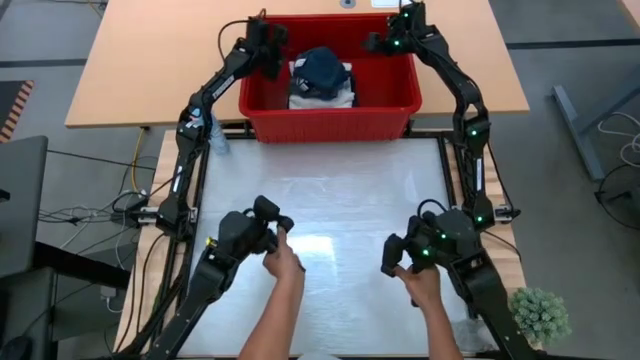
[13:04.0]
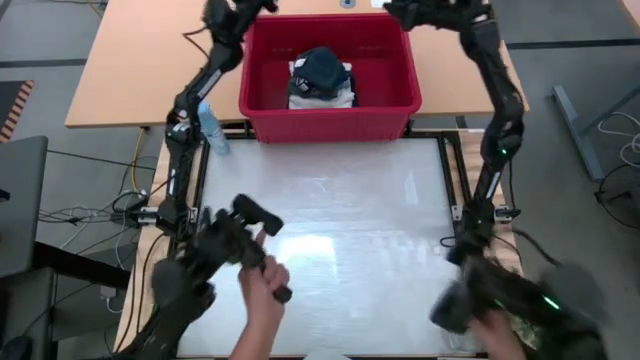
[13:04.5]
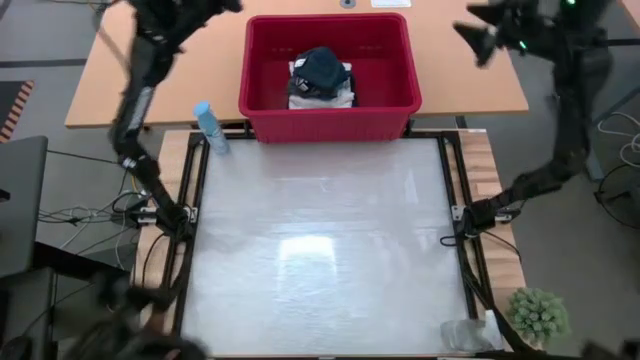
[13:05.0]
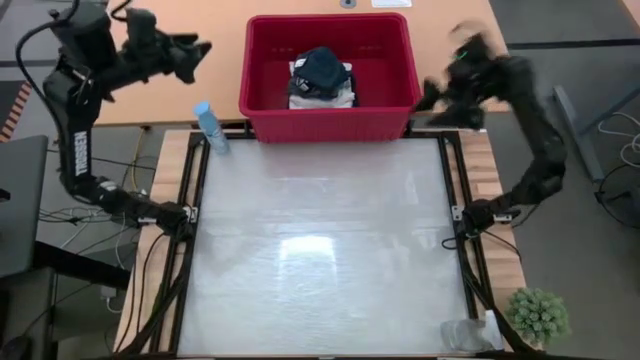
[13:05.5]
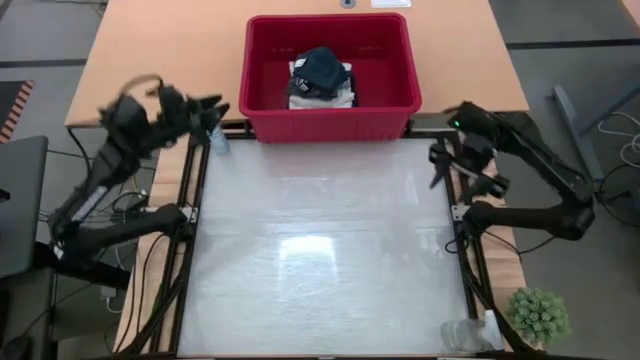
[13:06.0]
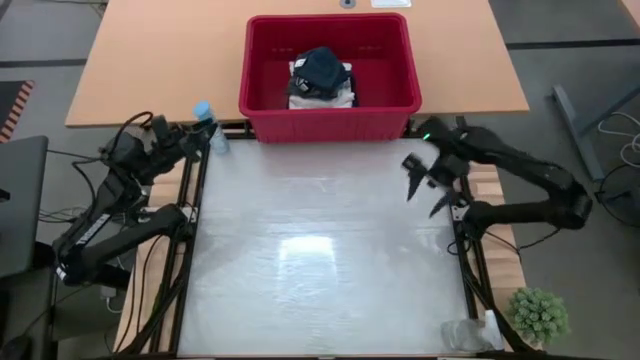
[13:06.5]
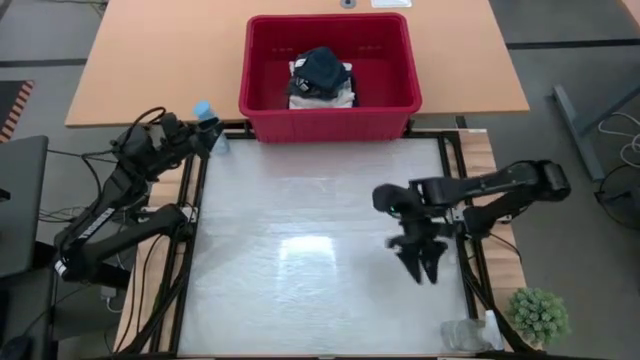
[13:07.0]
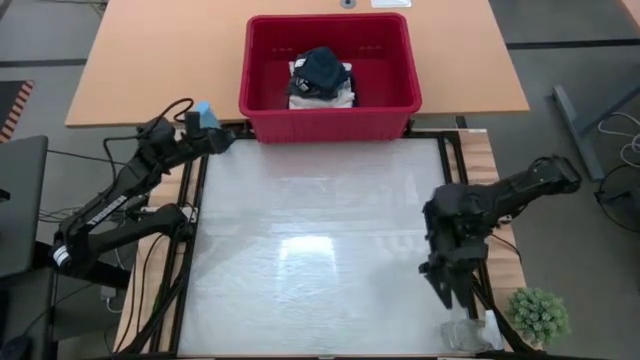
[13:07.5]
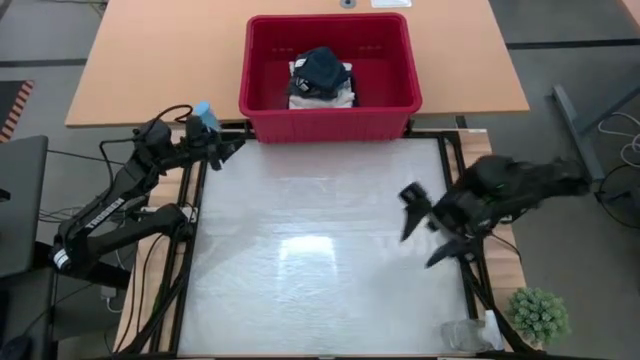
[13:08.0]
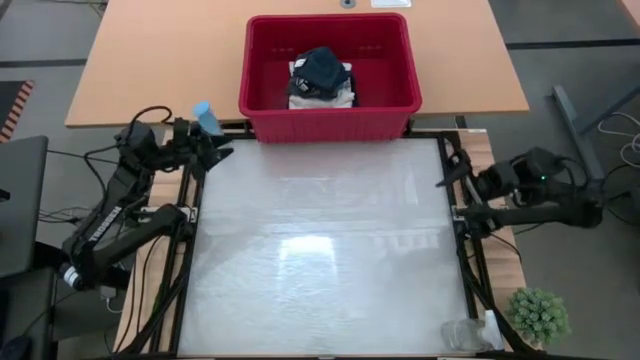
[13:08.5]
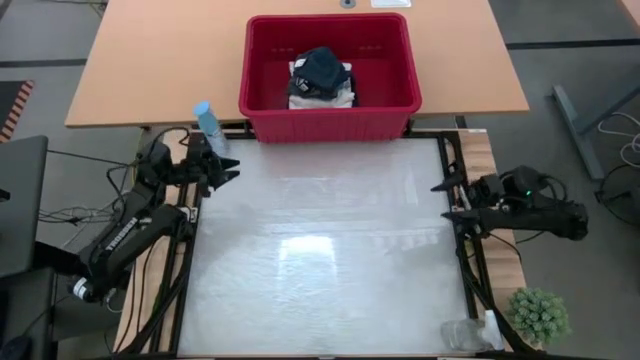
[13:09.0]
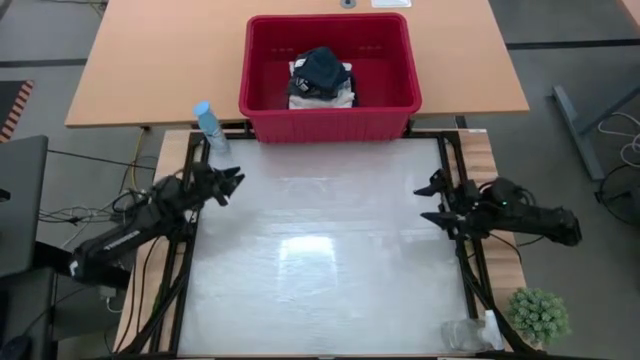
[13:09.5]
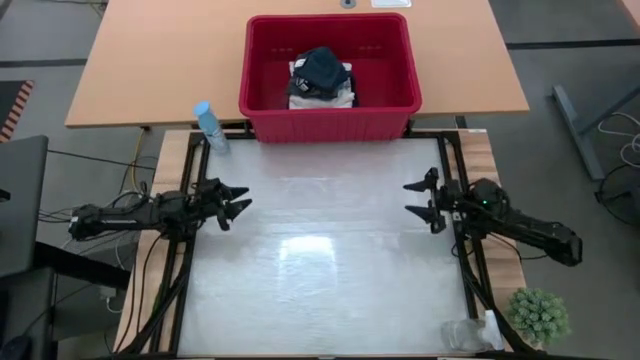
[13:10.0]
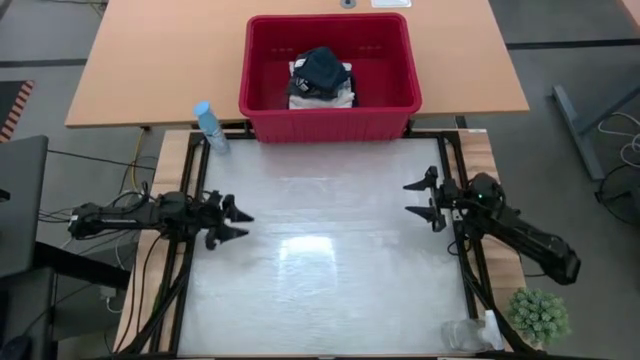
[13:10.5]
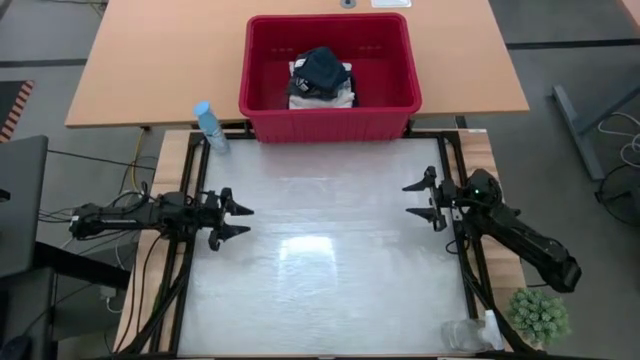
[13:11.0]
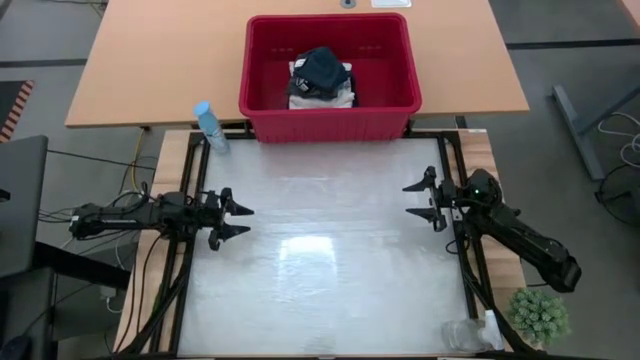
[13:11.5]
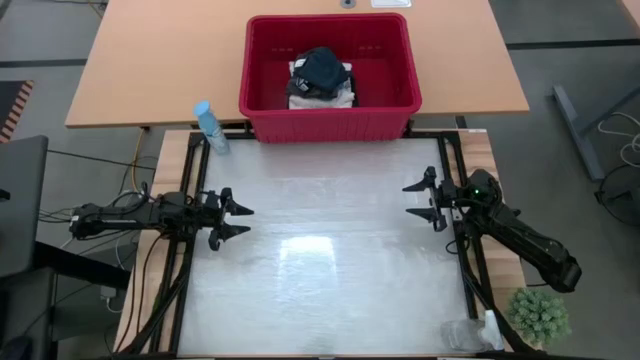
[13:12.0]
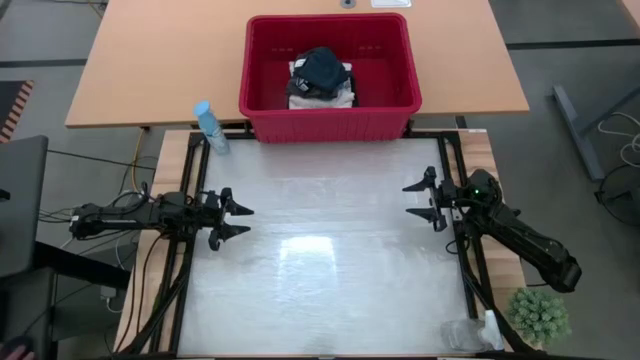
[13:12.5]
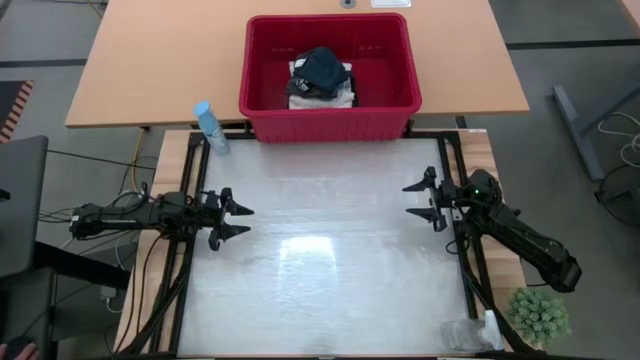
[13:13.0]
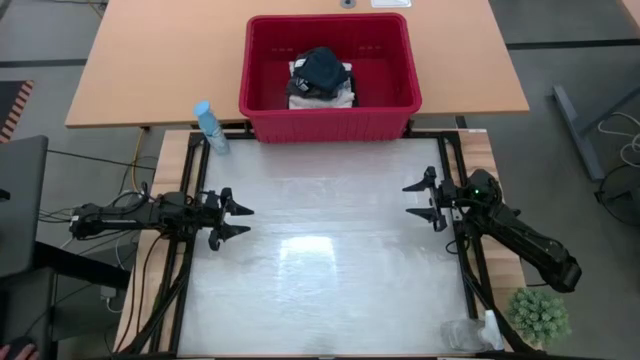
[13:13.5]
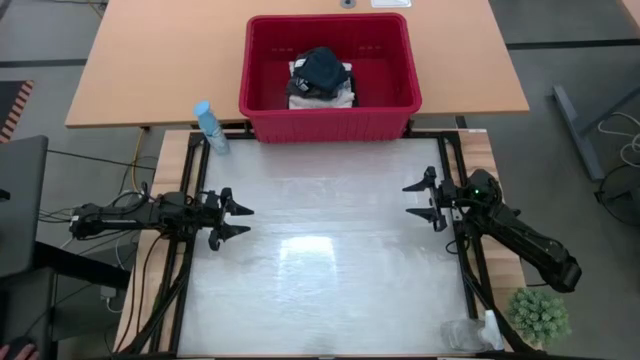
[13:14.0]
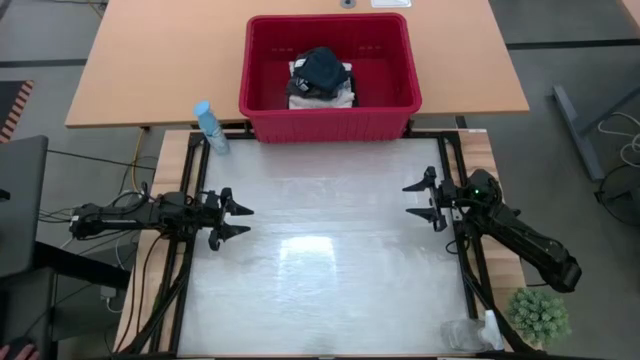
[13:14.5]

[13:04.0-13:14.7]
Task: Fold laundry
Return to Home Position

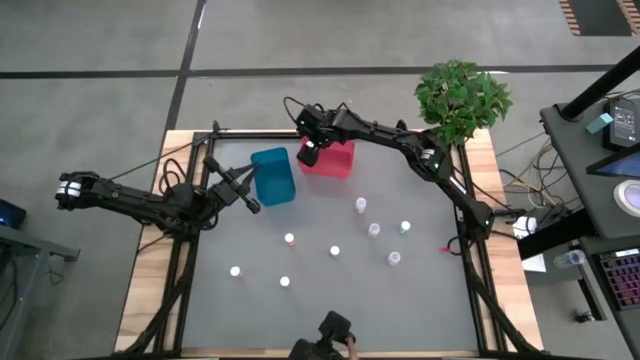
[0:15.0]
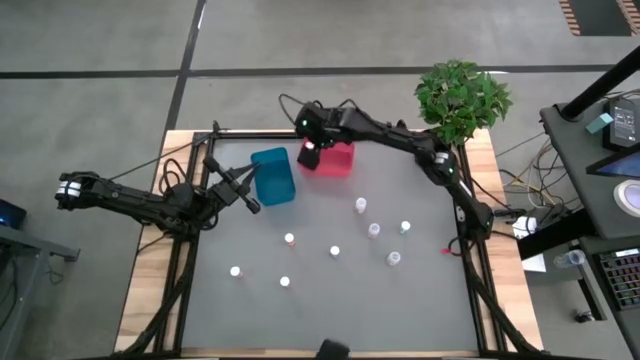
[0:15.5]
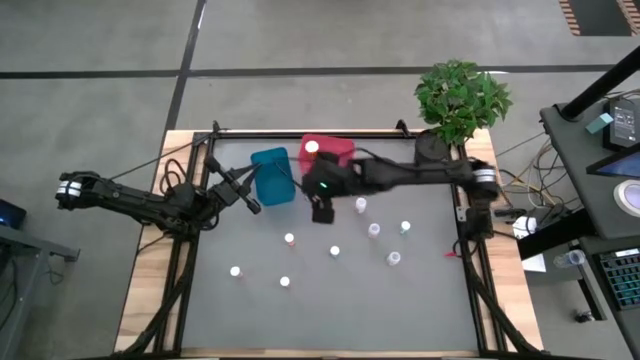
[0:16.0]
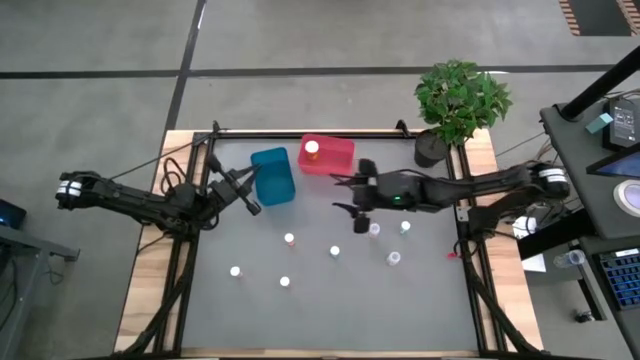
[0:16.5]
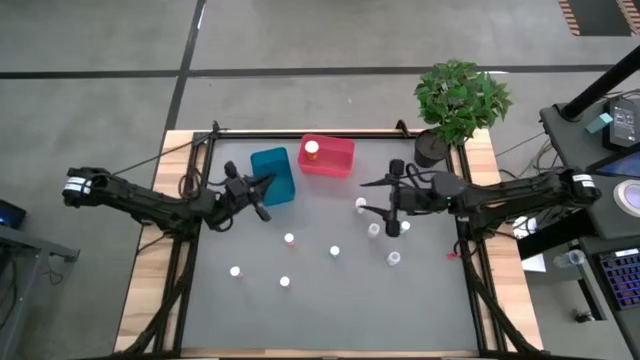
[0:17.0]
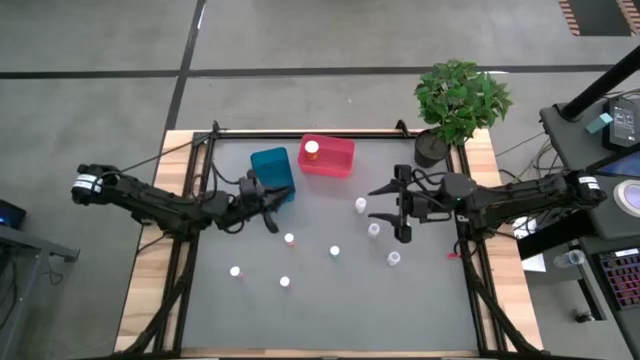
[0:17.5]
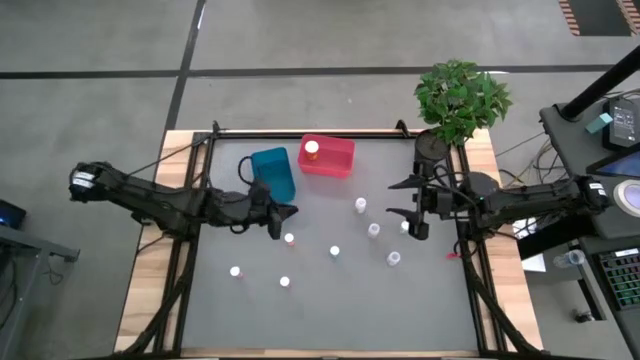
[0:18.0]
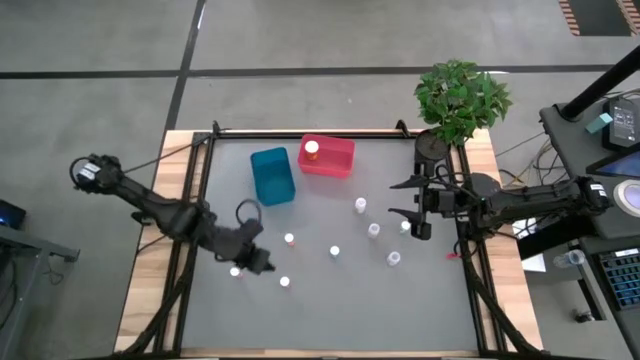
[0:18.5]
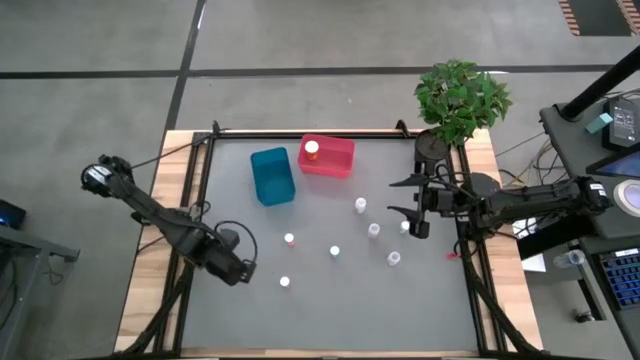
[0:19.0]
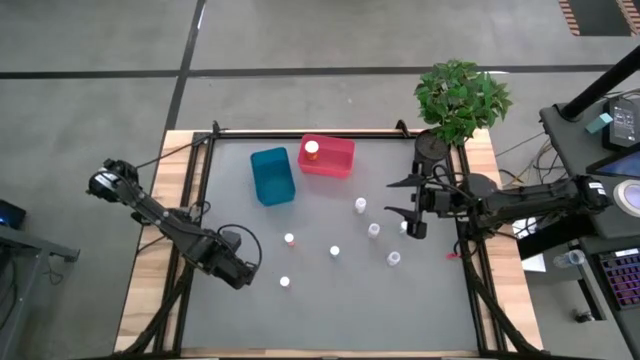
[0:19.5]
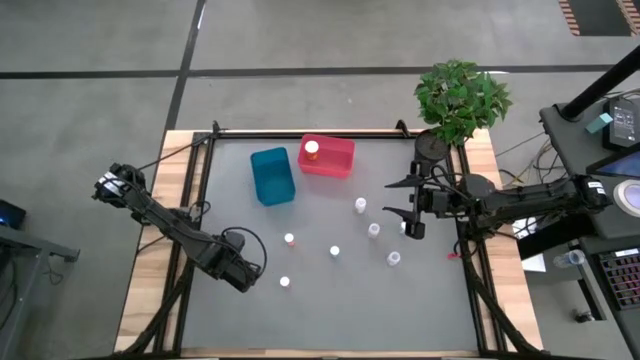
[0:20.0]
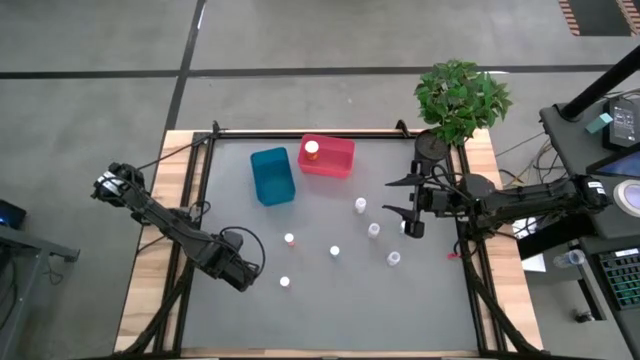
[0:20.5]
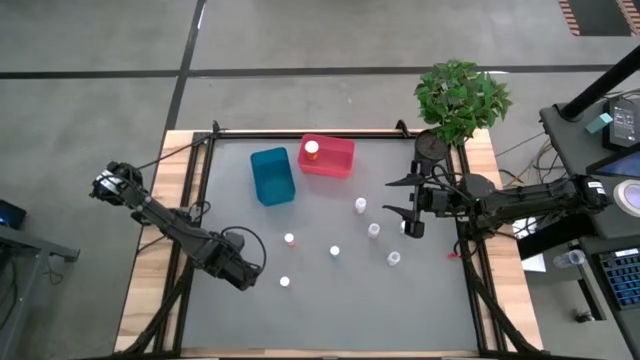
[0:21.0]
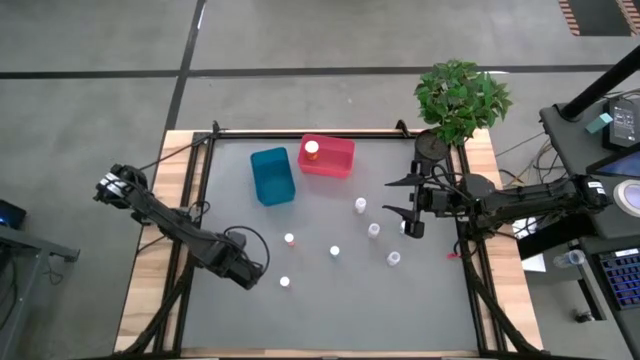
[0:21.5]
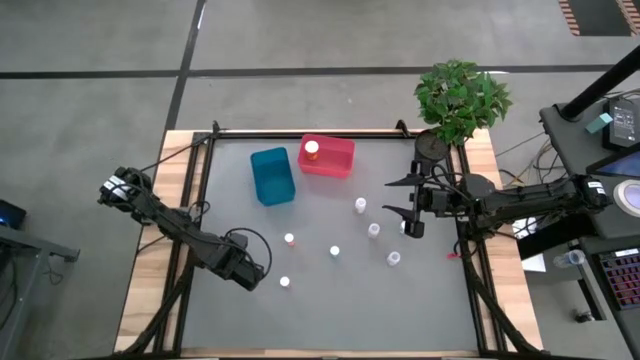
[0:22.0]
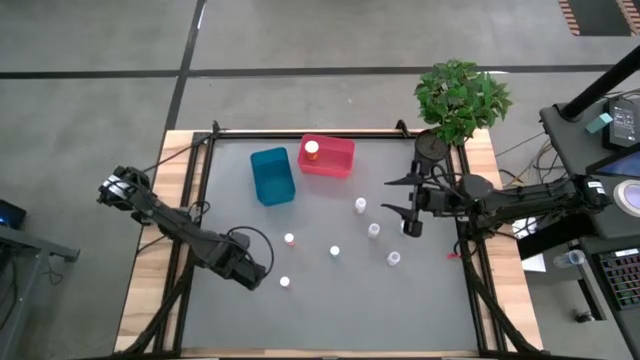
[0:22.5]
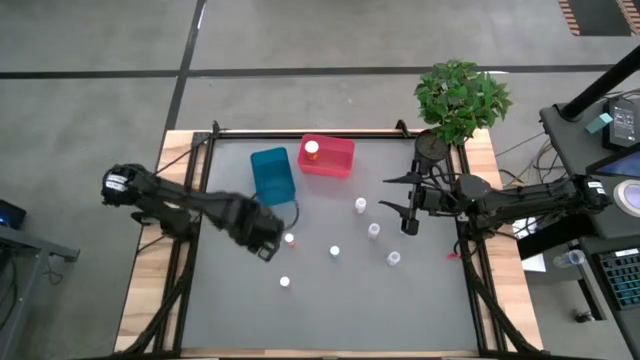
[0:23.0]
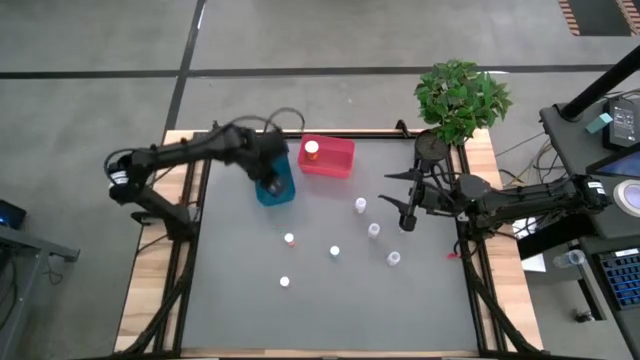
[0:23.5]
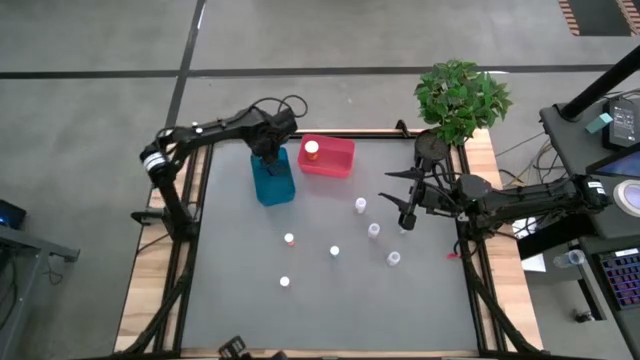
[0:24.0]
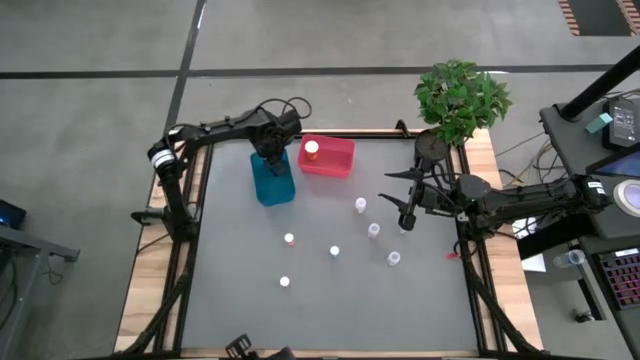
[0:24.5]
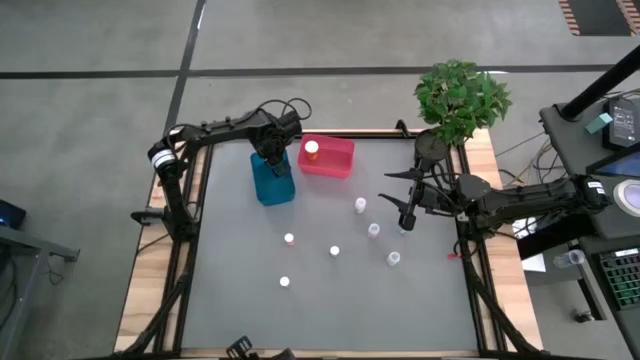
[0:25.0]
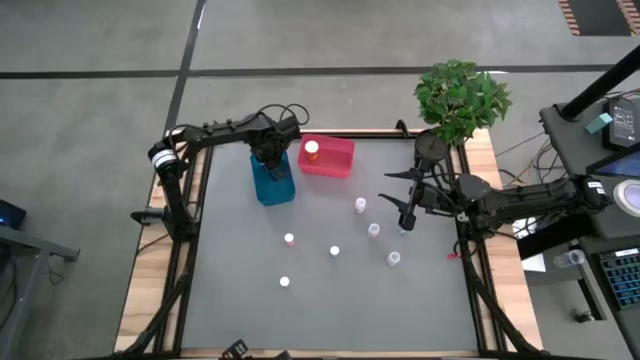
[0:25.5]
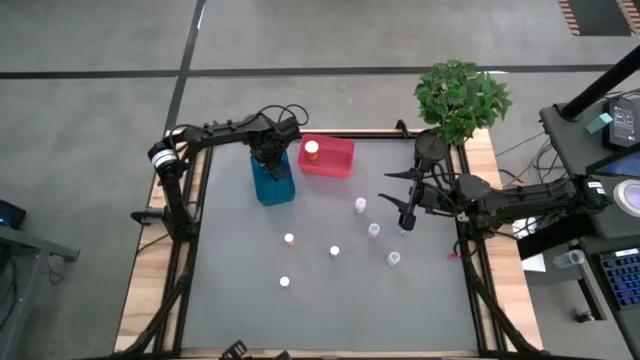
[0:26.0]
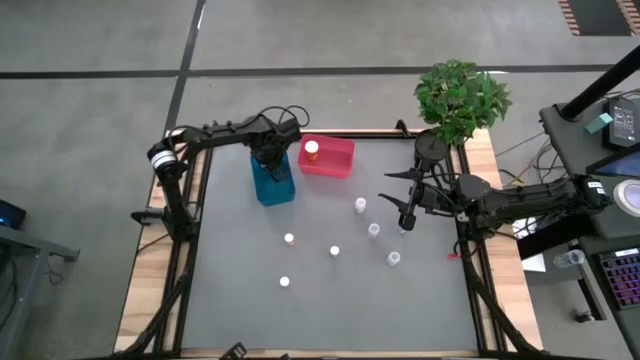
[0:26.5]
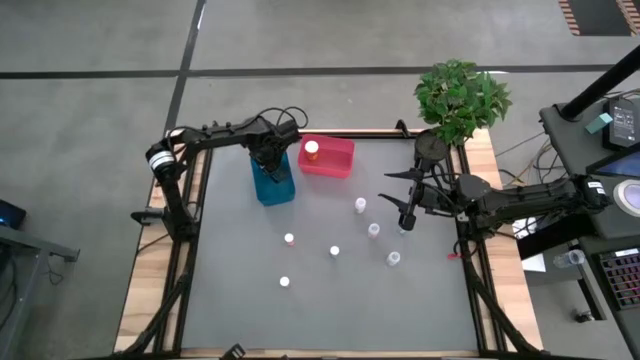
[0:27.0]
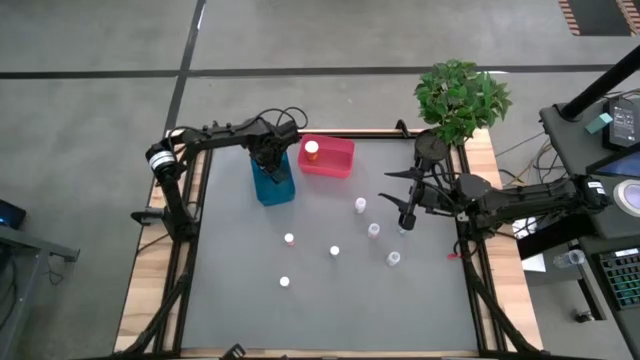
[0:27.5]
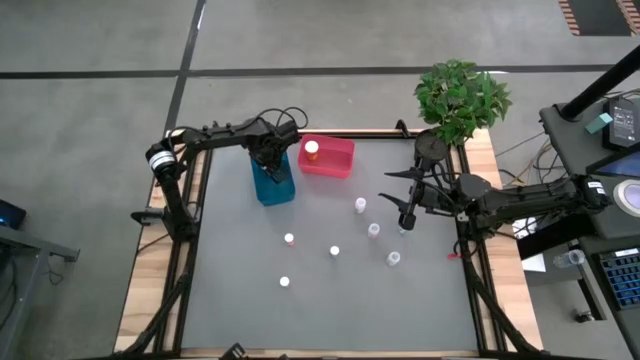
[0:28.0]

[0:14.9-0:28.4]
Task: Pick and place medicine bottles into bin by pill shape (circle, oval)
Put the left violet tablet bottle into the blue bin
